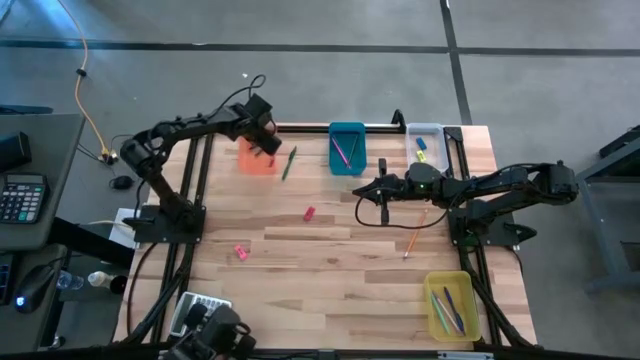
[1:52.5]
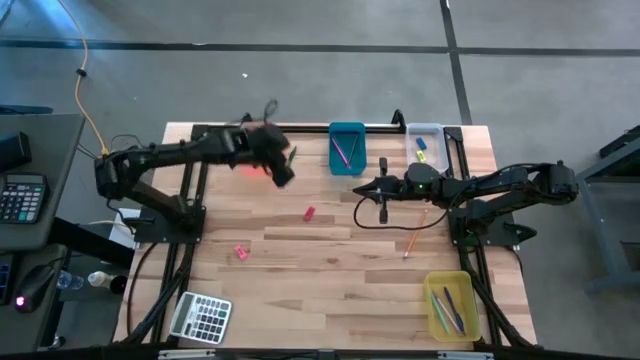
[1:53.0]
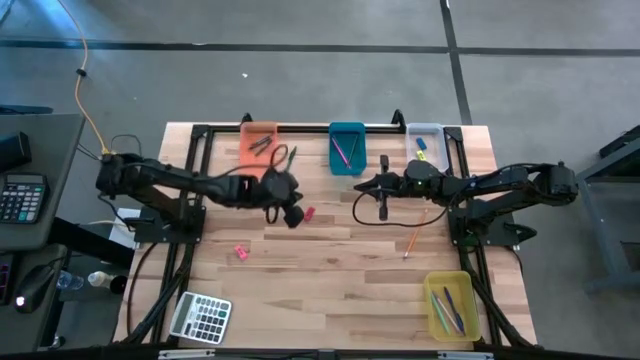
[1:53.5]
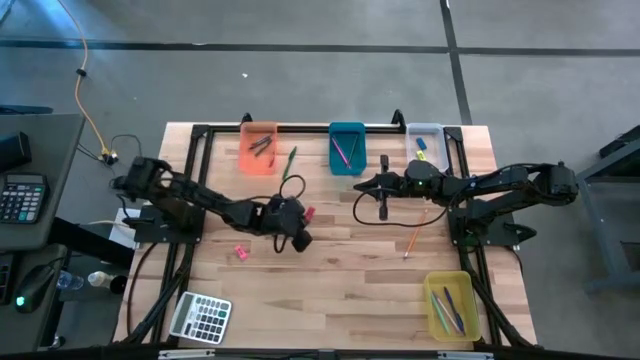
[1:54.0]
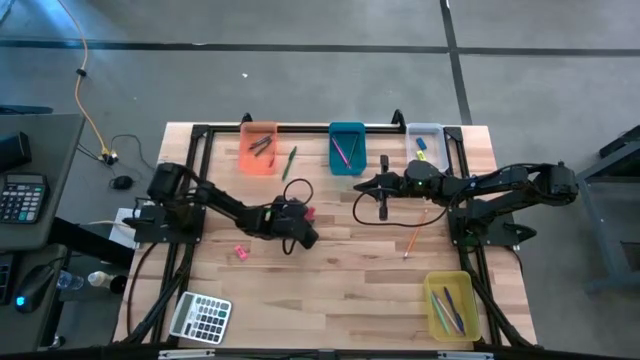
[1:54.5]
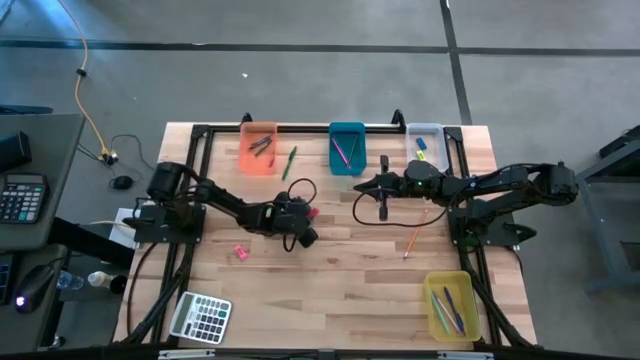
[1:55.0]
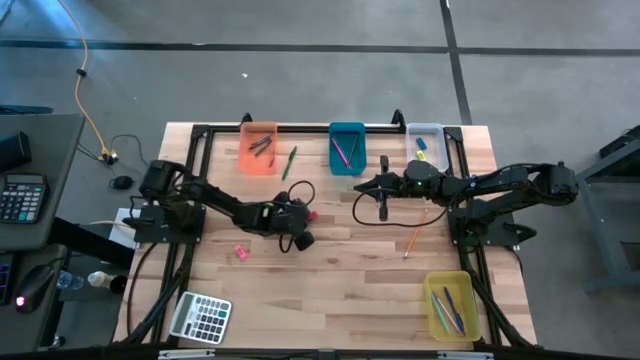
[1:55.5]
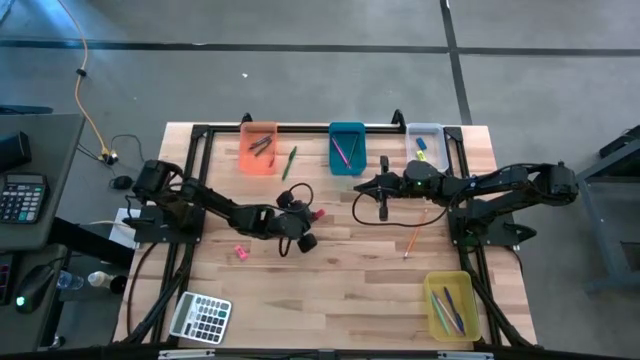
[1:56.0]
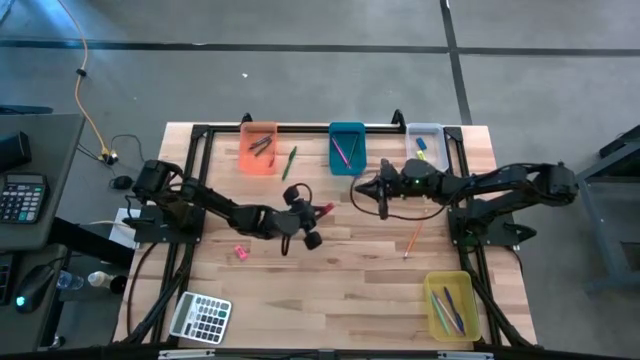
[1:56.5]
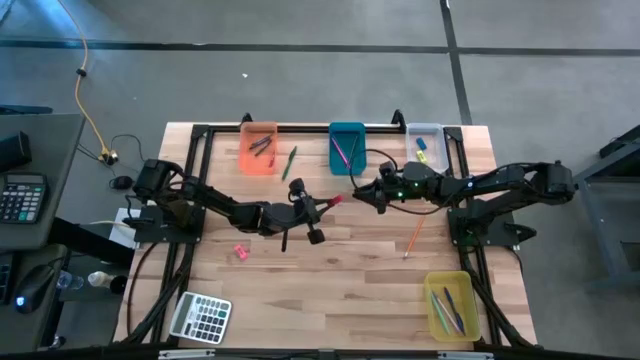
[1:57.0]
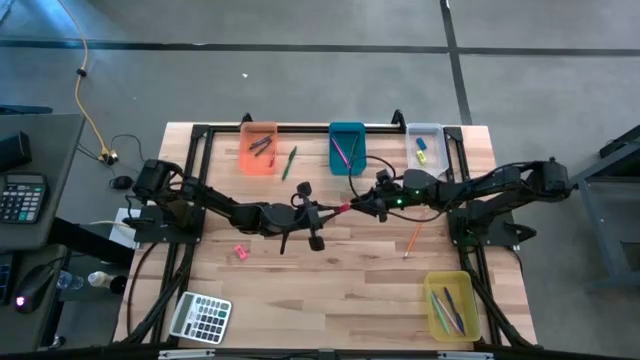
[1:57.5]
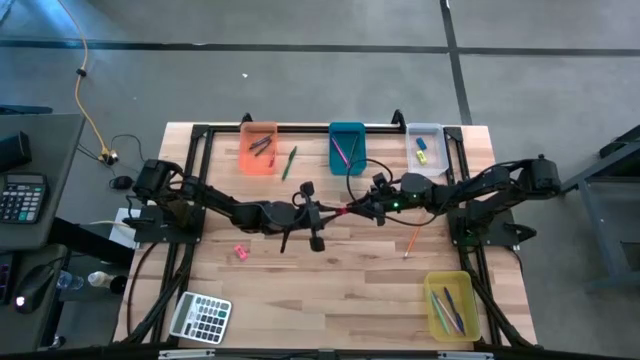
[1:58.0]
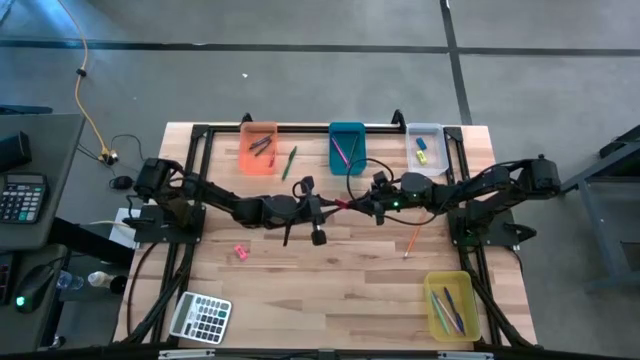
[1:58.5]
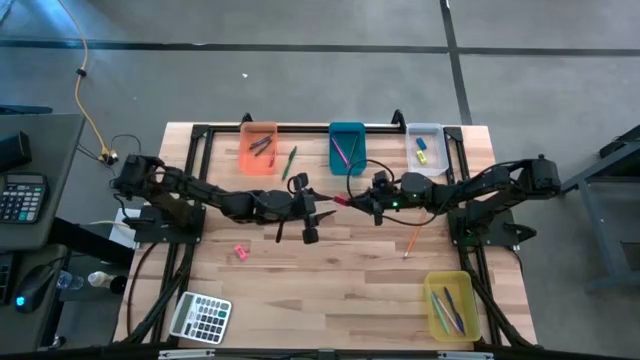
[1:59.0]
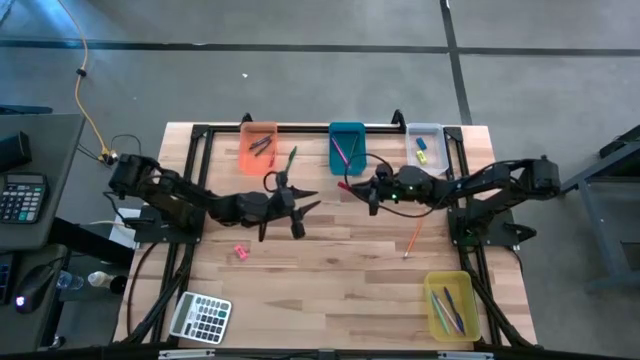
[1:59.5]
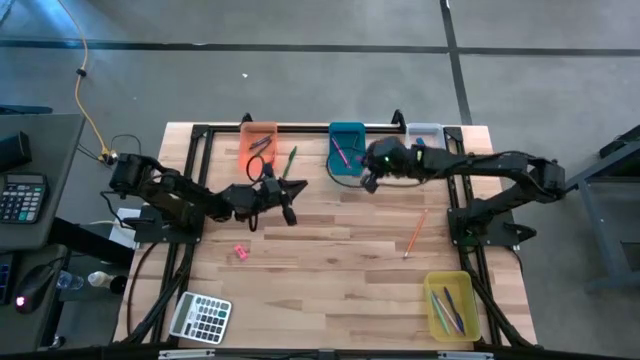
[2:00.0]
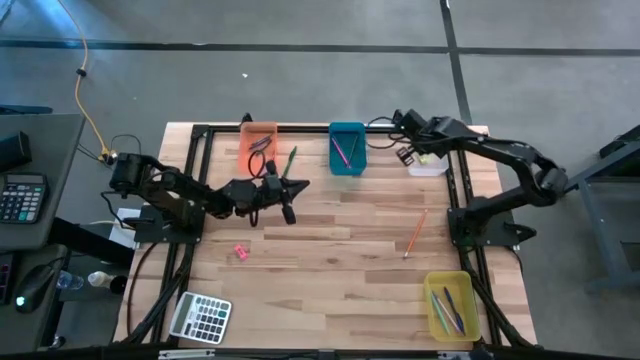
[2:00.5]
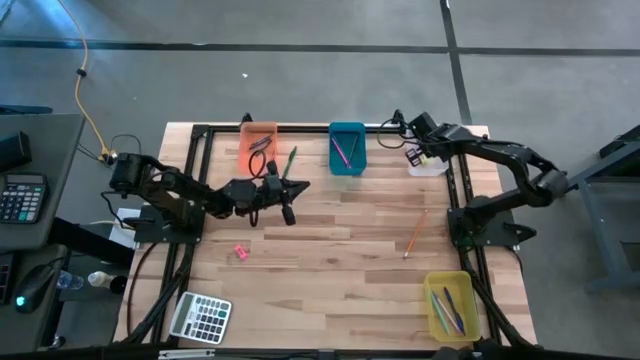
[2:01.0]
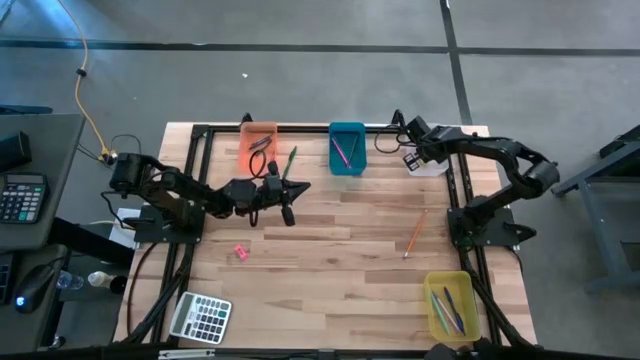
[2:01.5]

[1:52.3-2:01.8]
Task: Sort crayons/erasers/pens/pencils in bins
Put the orange eraser into the transparent bin

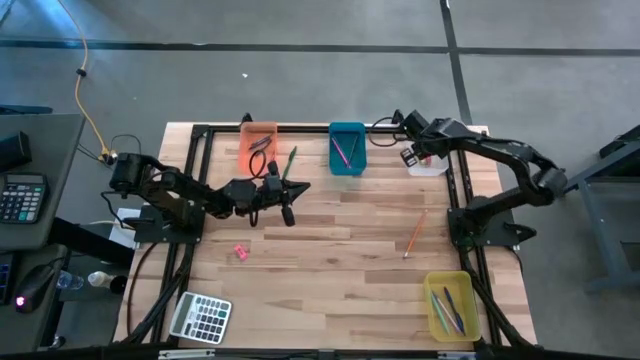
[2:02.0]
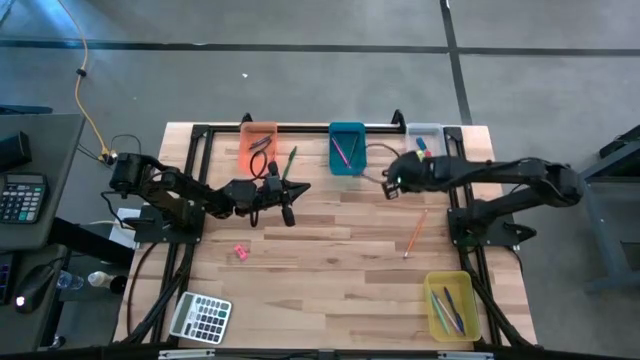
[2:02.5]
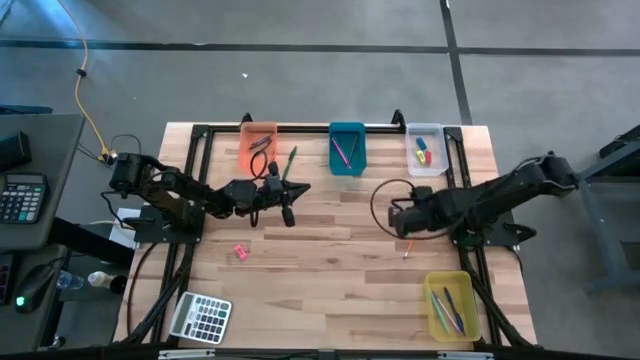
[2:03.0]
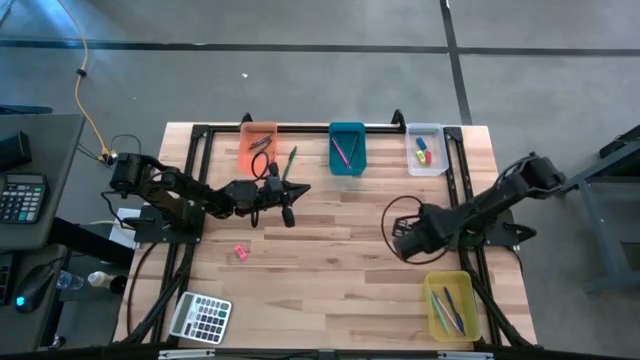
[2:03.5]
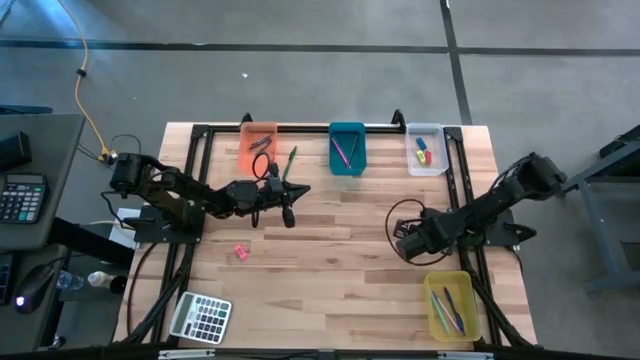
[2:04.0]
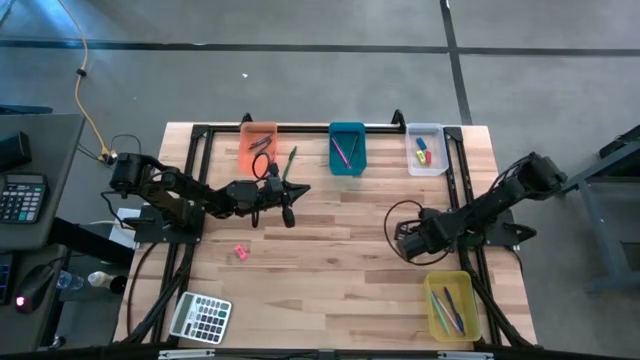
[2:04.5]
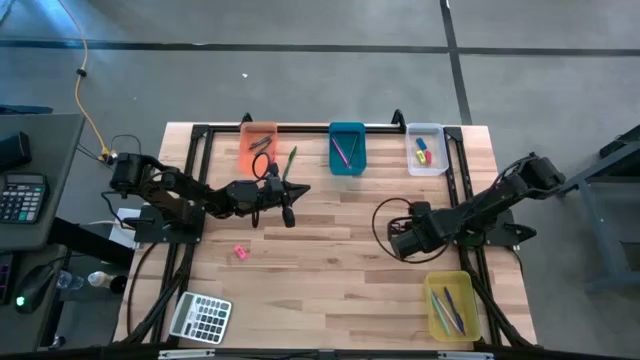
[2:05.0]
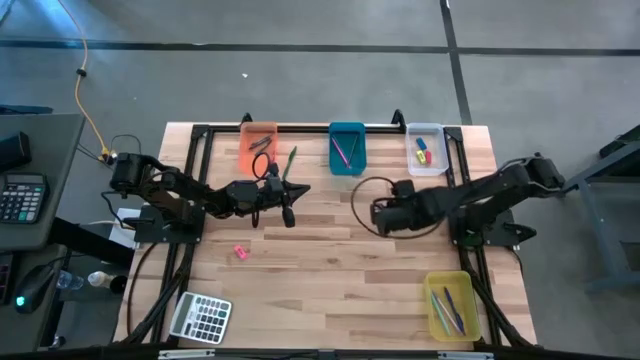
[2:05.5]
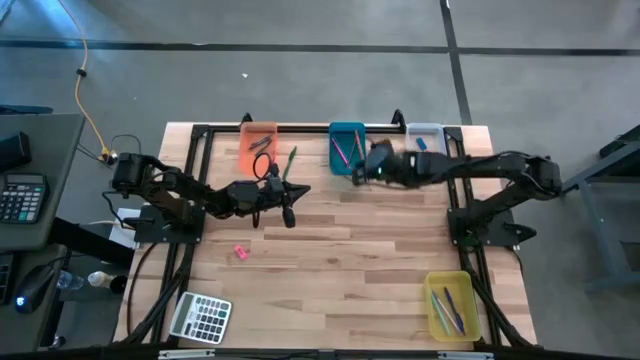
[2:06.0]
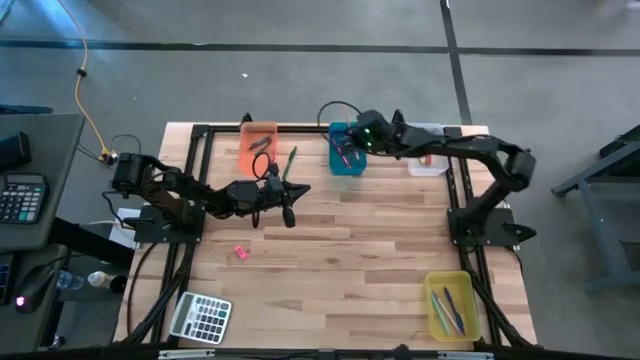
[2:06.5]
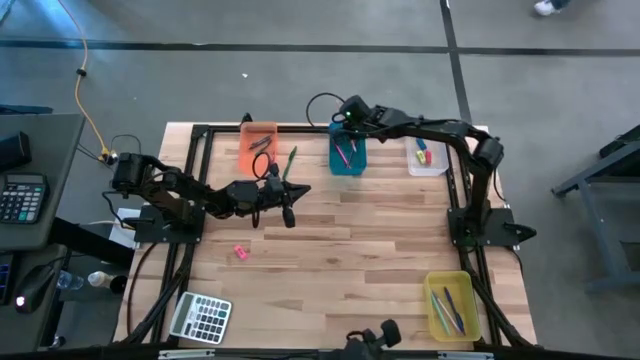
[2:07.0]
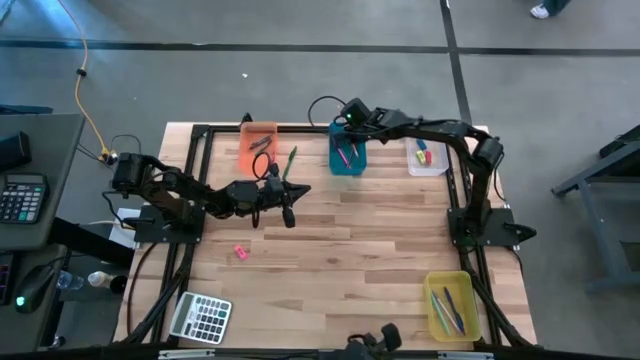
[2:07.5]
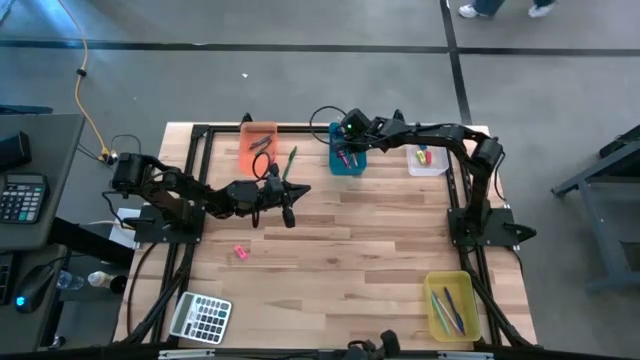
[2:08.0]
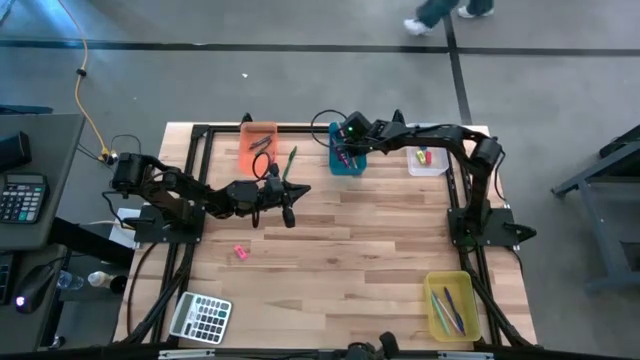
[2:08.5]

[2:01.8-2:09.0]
Put the orange pencil into the blue bin

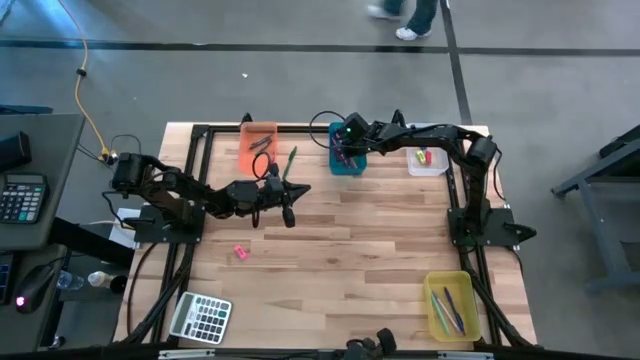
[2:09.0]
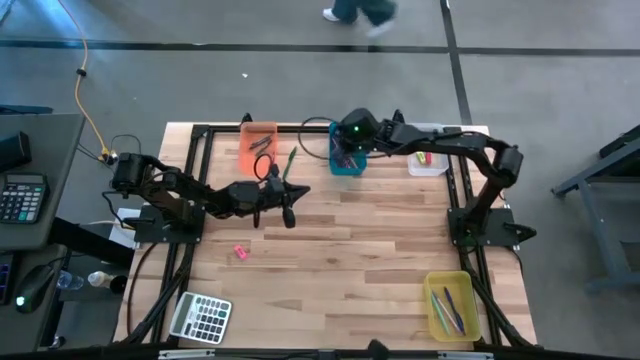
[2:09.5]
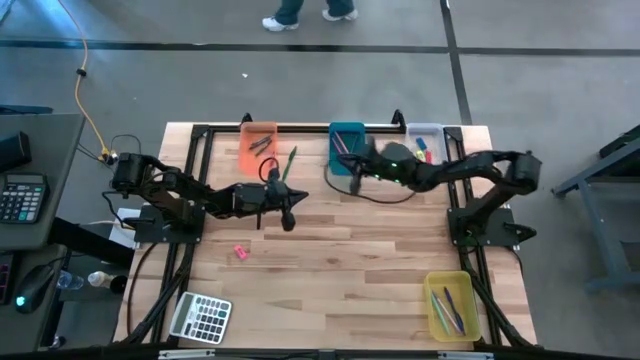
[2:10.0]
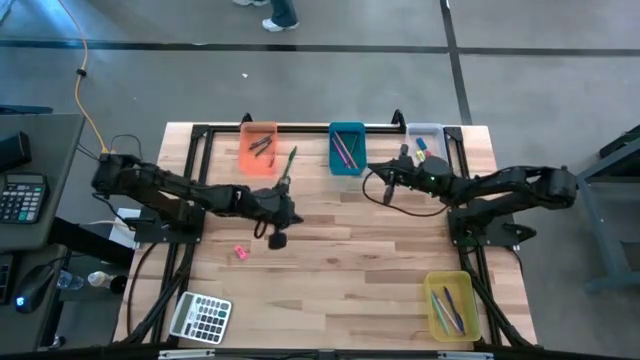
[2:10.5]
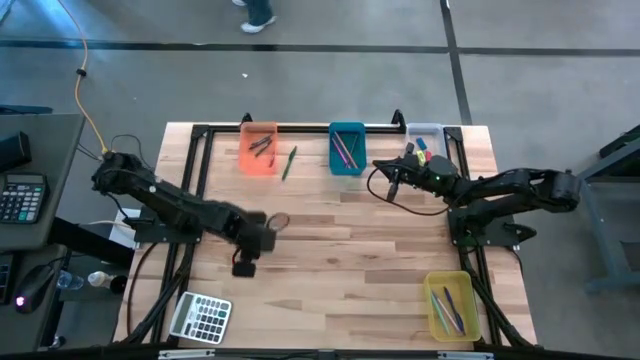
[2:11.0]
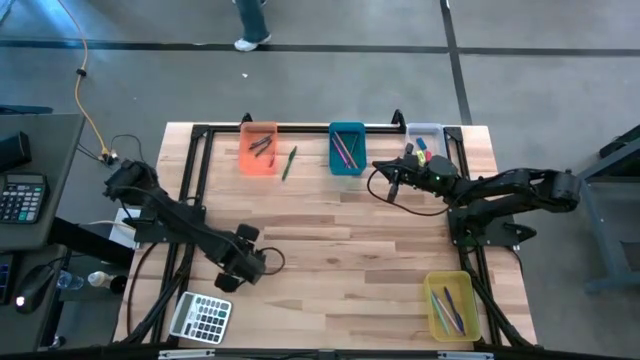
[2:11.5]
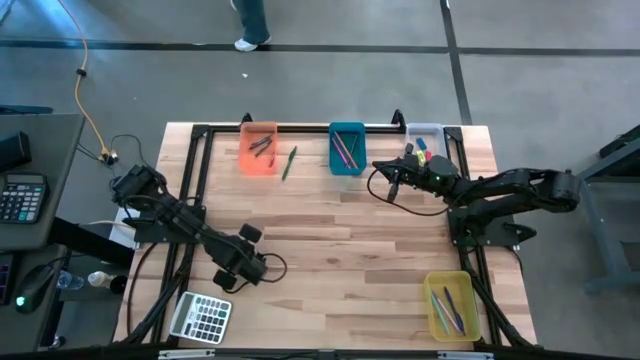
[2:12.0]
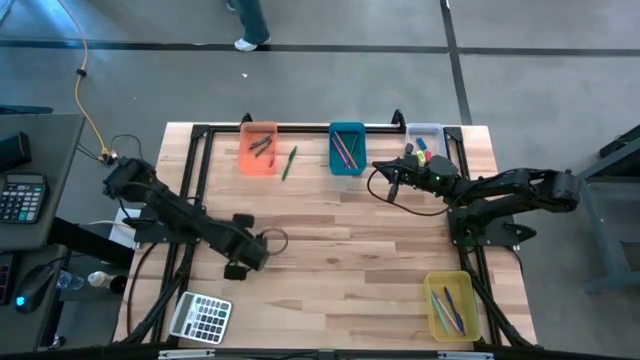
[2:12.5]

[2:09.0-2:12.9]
Put the pink eraser into the transparent bin

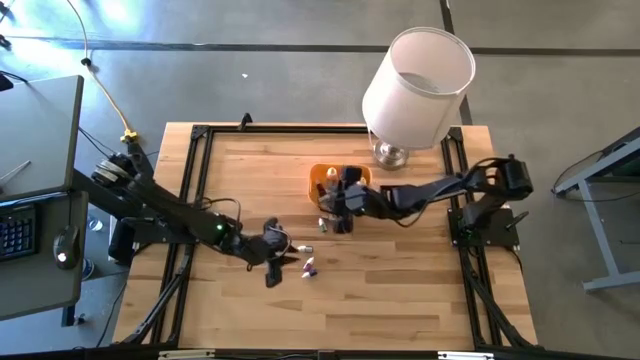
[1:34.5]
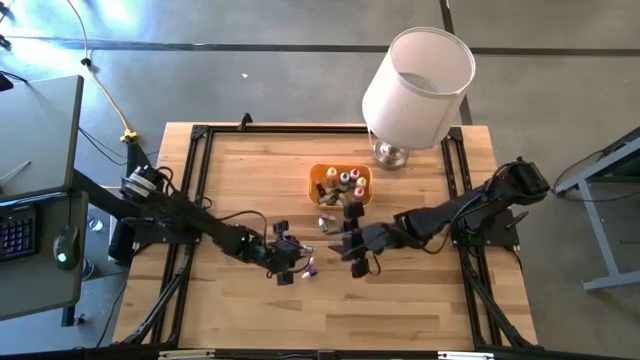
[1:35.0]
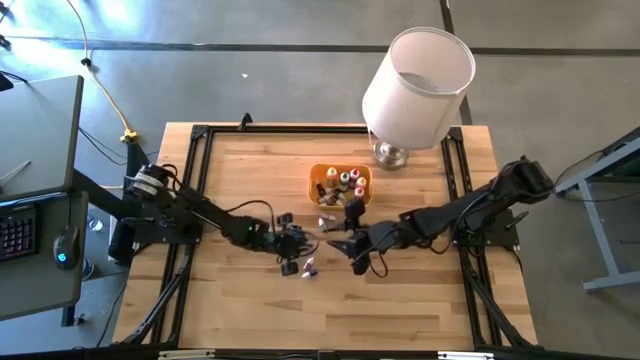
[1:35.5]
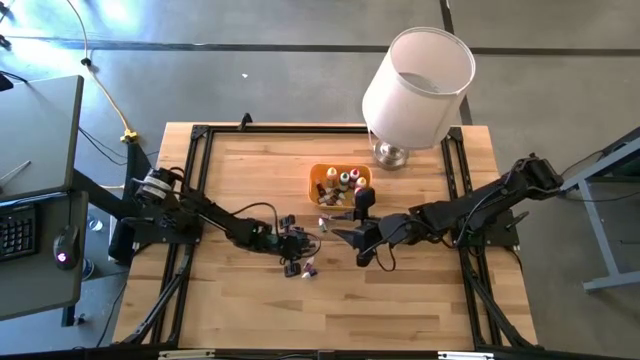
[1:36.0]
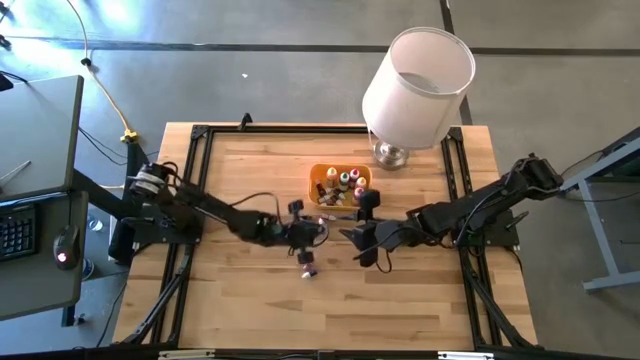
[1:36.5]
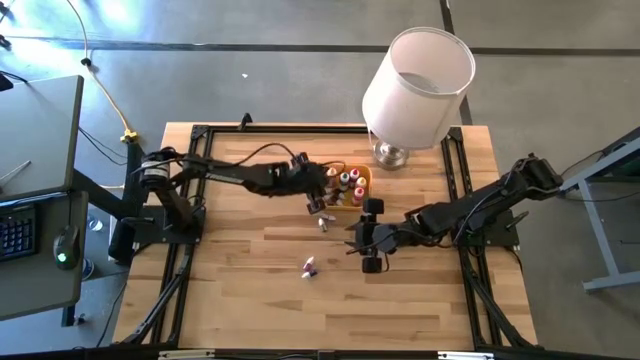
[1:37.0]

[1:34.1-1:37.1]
Task: Pick & Place food coloring
Put the small black food coloring bottle into the yellow container
